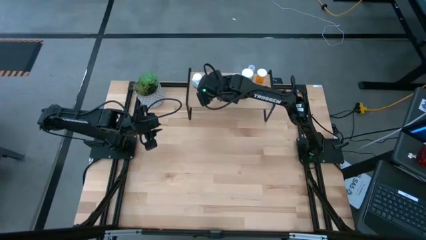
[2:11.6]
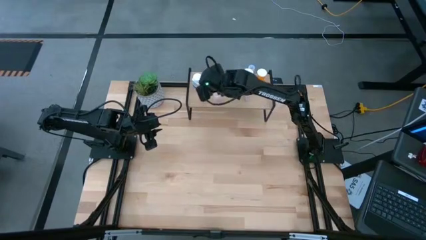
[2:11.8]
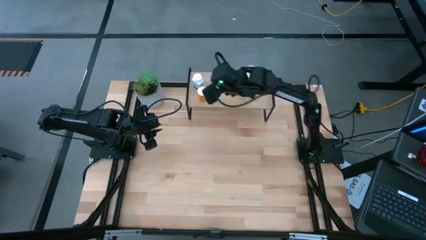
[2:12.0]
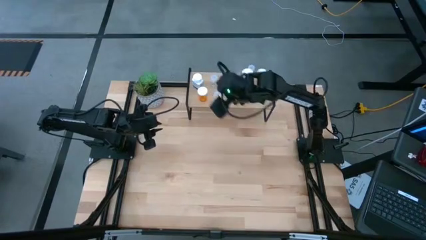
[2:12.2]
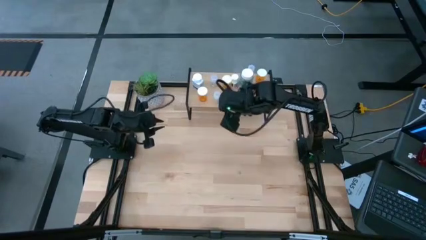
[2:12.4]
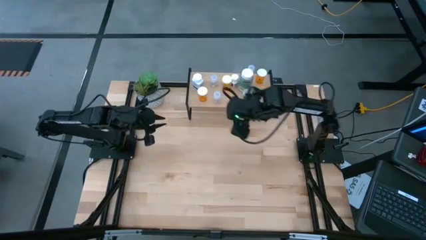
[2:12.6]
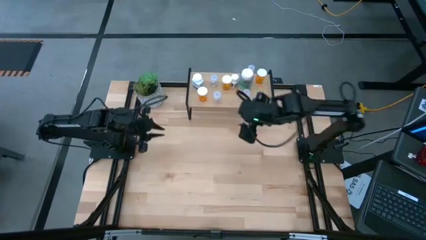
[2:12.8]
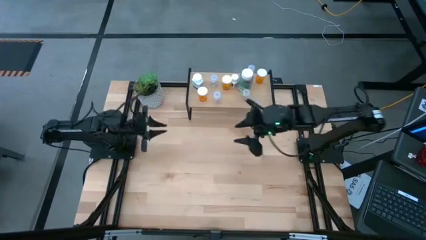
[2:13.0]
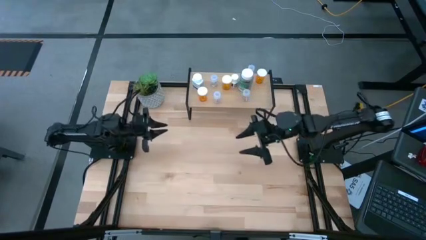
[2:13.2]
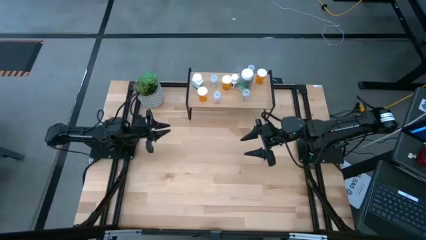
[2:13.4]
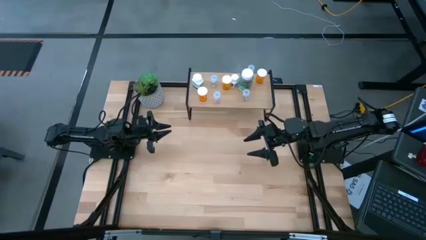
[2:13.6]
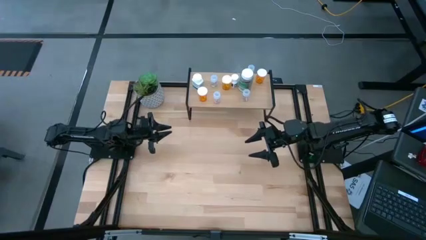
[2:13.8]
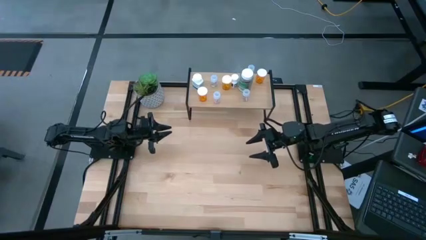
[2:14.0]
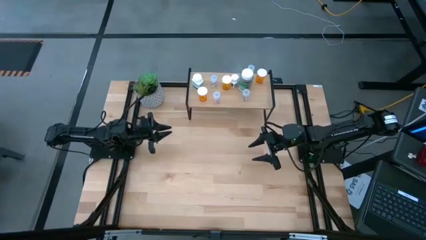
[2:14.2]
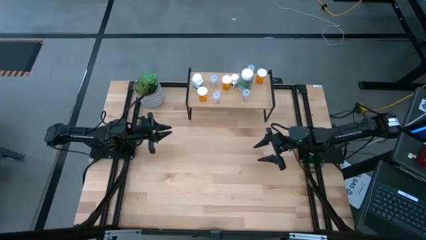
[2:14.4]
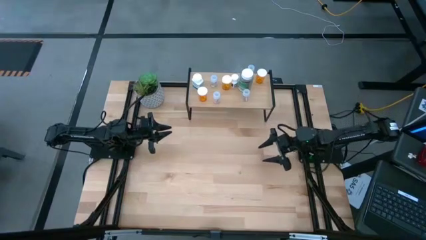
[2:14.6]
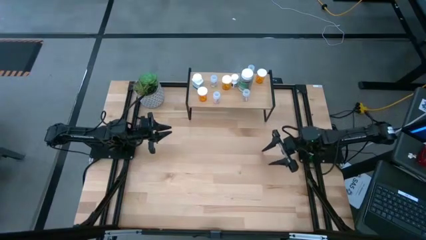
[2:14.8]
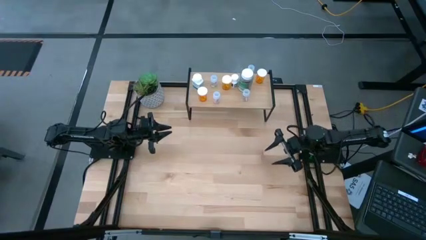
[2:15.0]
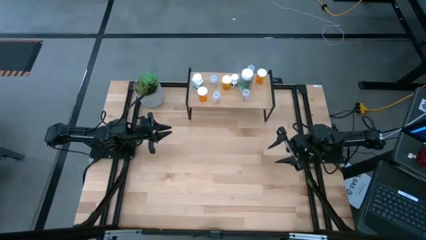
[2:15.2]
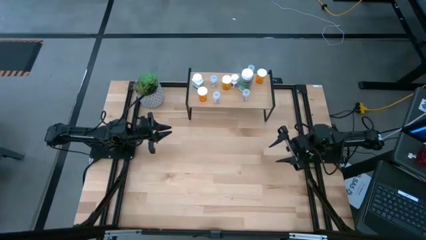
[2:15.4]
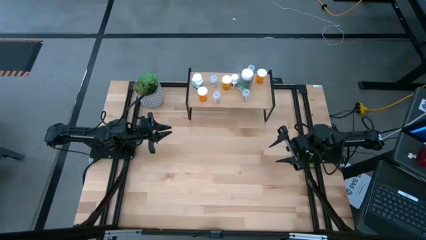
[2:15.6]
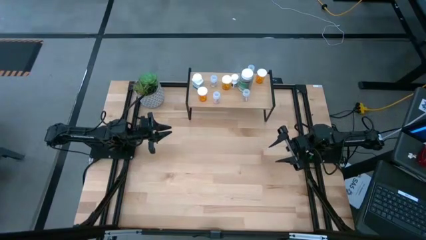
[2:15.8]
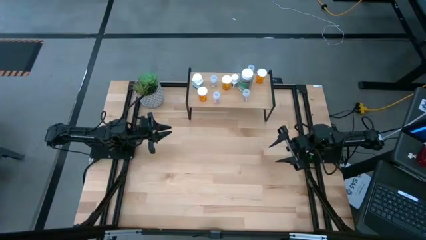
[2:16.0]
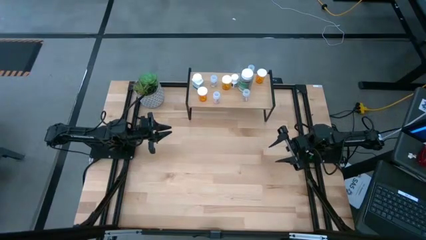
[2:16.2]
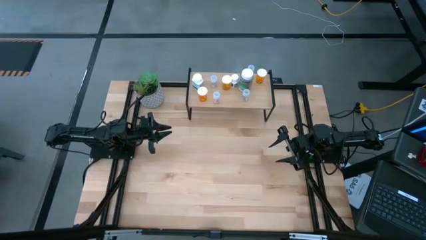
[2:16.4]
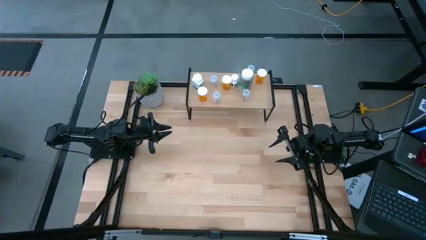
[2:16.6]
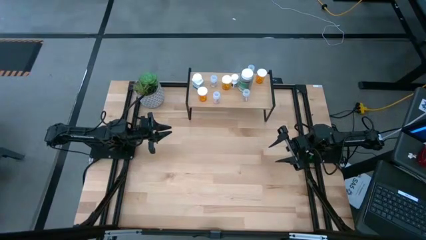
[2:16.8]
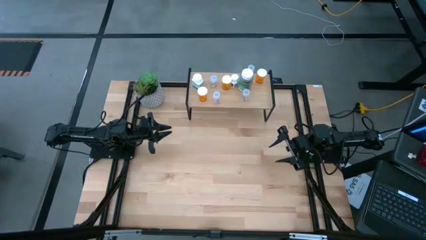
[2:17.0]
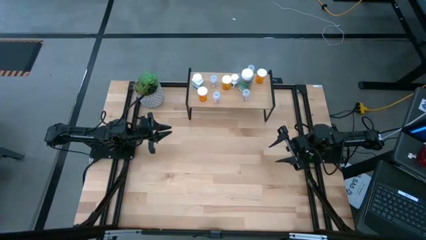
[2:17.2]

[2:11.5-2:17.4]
Task: Pick and place medicine bottles onto shelf by color
Return to Home Position

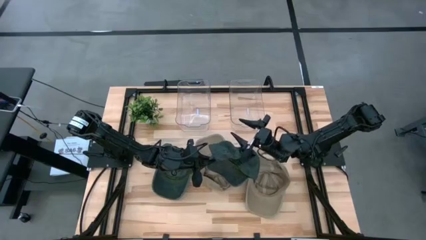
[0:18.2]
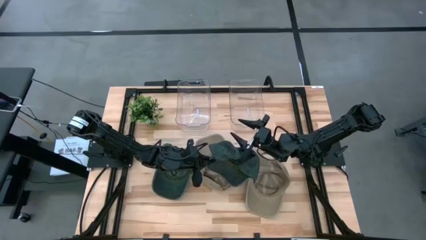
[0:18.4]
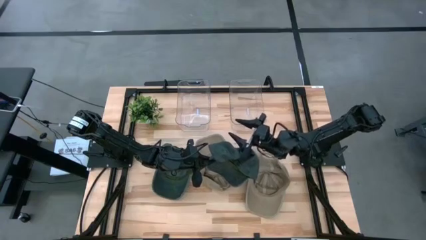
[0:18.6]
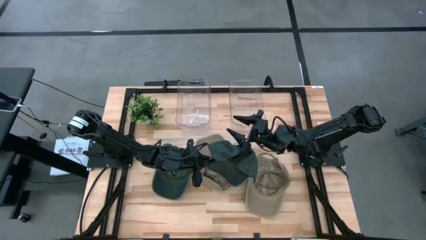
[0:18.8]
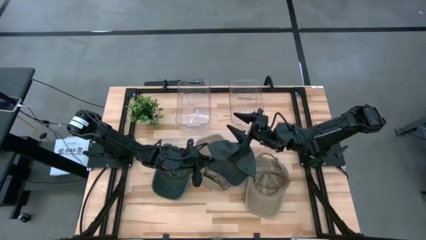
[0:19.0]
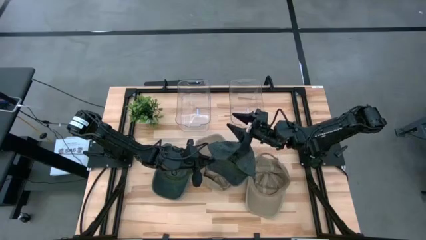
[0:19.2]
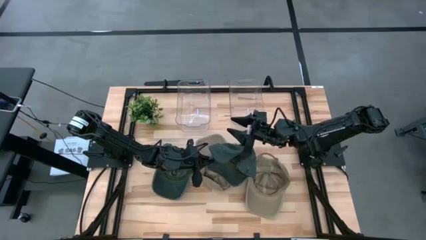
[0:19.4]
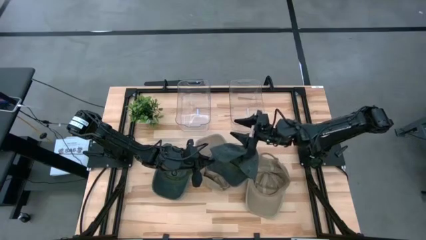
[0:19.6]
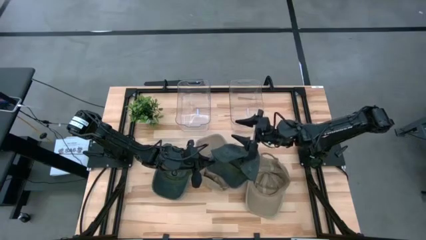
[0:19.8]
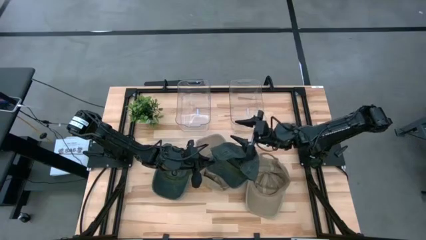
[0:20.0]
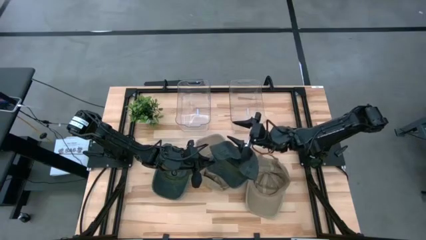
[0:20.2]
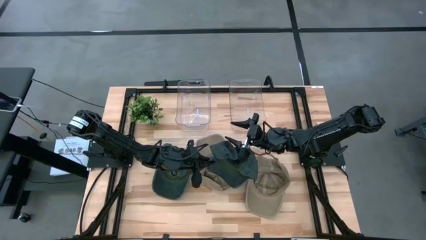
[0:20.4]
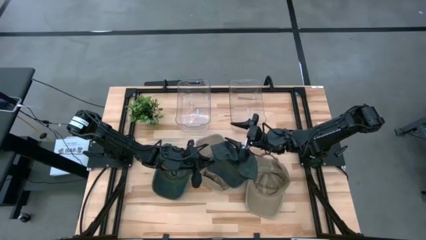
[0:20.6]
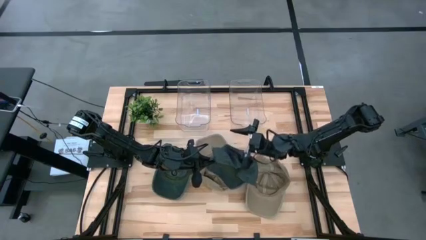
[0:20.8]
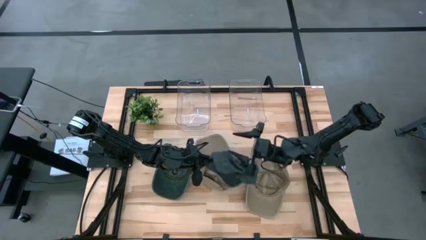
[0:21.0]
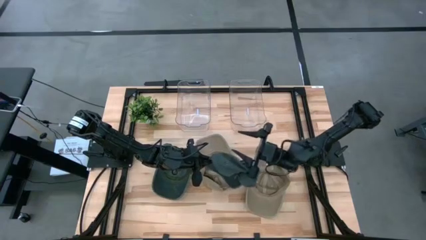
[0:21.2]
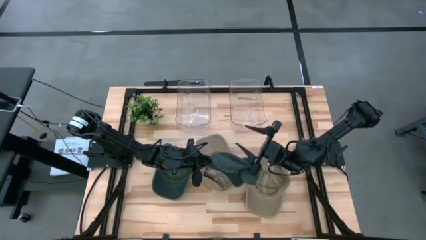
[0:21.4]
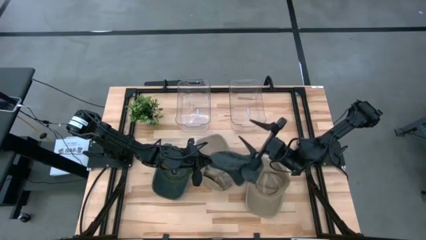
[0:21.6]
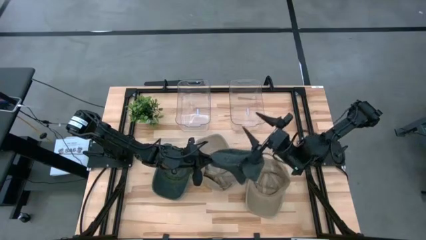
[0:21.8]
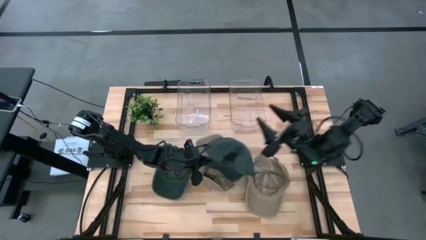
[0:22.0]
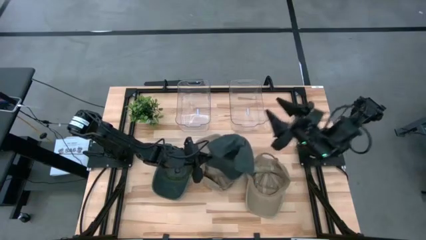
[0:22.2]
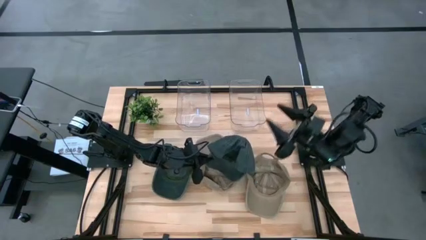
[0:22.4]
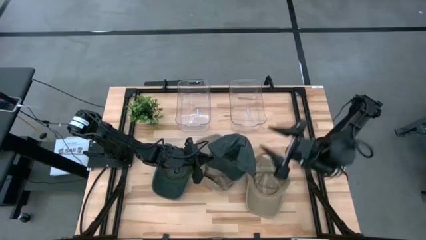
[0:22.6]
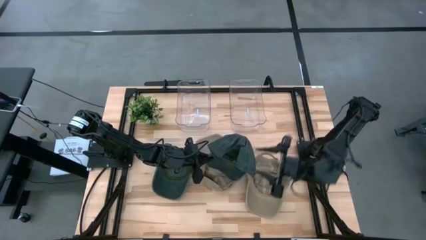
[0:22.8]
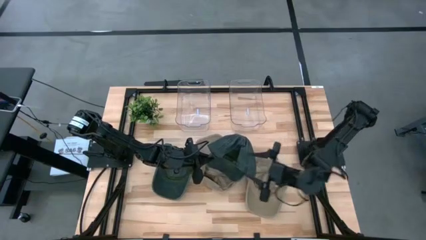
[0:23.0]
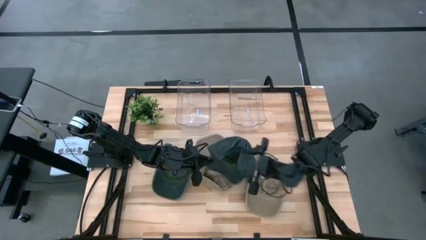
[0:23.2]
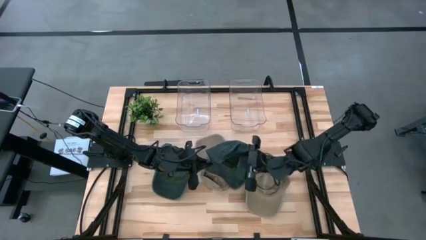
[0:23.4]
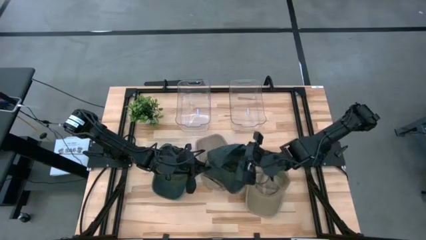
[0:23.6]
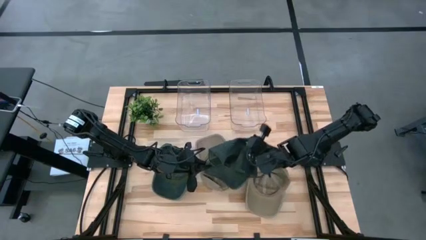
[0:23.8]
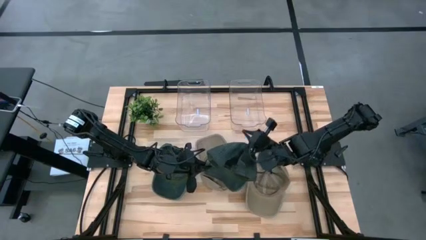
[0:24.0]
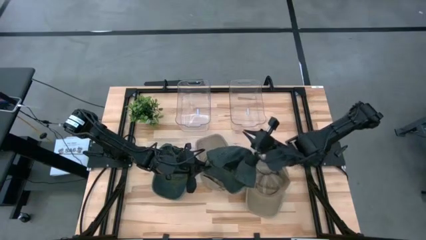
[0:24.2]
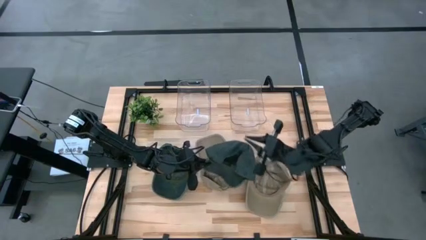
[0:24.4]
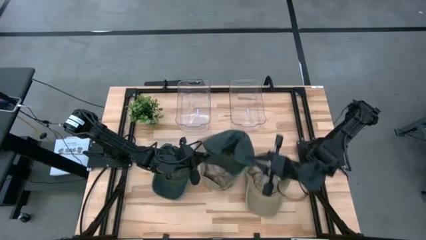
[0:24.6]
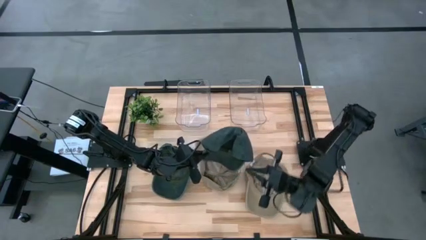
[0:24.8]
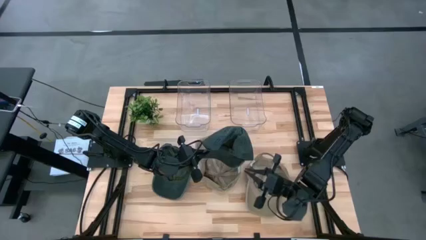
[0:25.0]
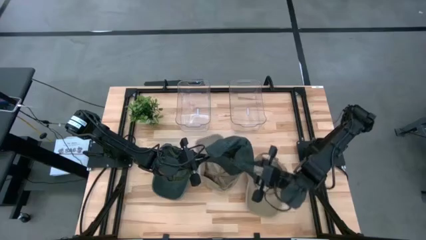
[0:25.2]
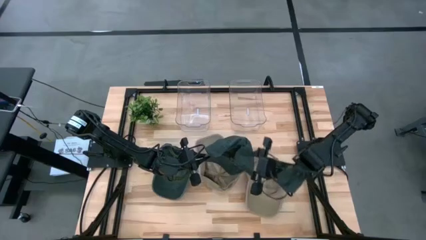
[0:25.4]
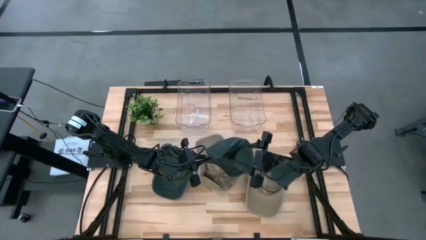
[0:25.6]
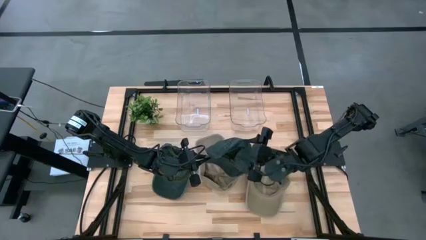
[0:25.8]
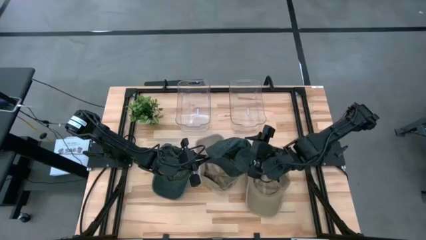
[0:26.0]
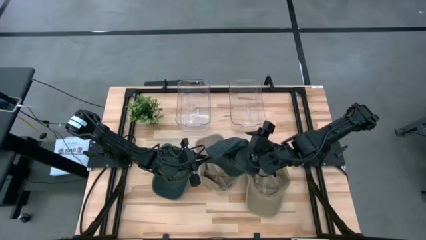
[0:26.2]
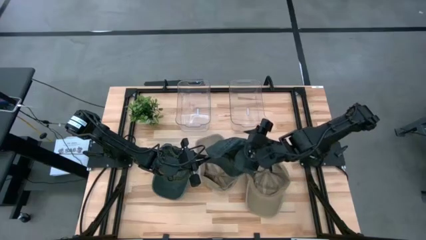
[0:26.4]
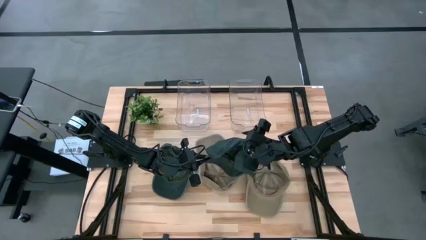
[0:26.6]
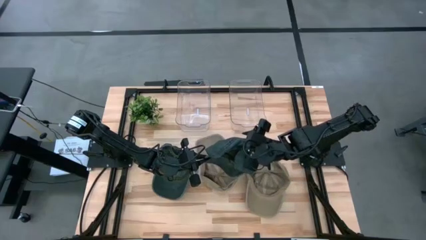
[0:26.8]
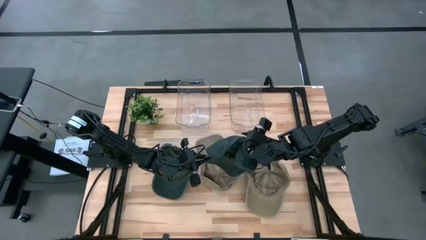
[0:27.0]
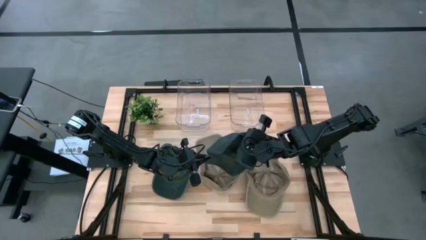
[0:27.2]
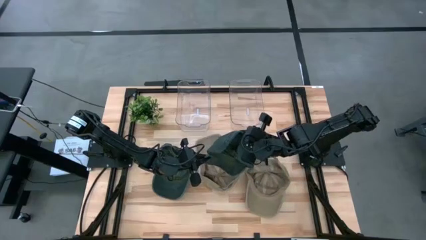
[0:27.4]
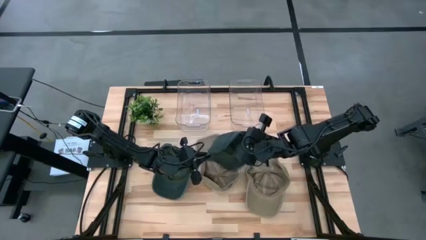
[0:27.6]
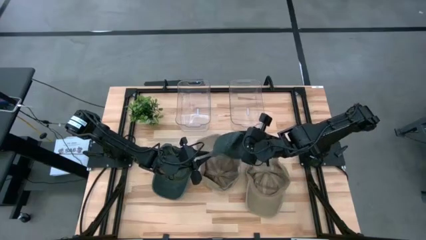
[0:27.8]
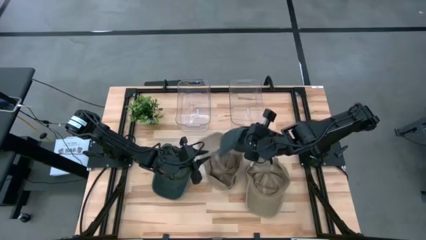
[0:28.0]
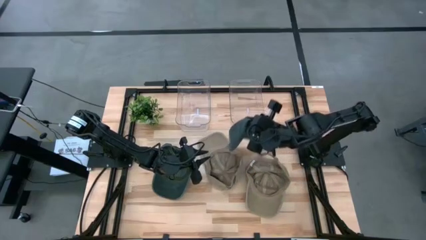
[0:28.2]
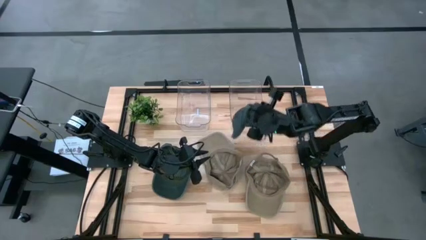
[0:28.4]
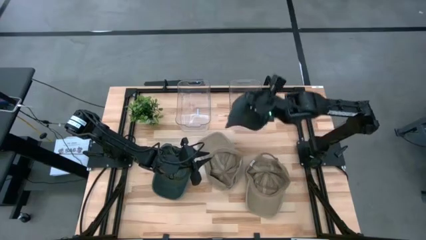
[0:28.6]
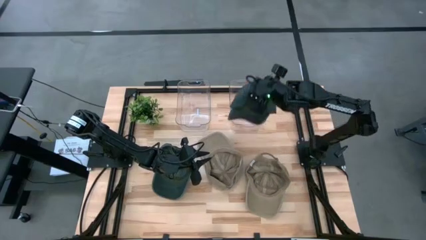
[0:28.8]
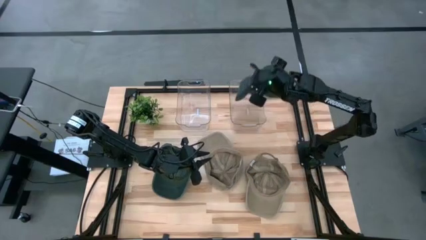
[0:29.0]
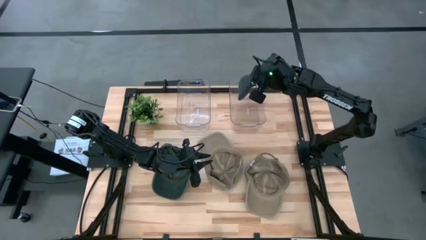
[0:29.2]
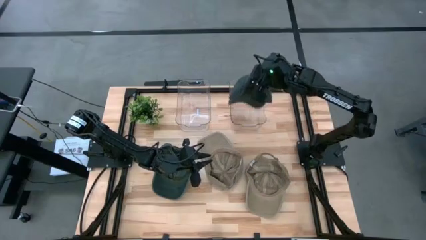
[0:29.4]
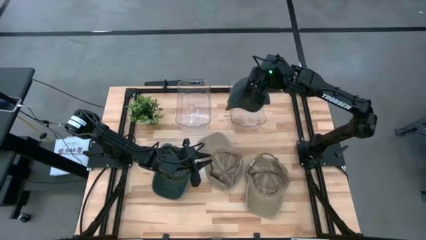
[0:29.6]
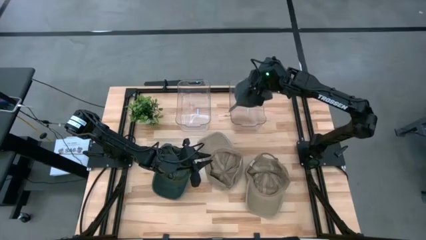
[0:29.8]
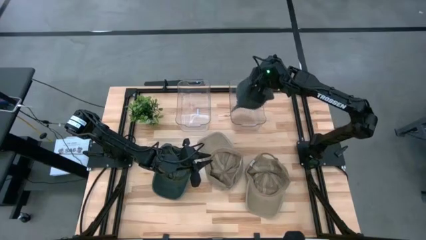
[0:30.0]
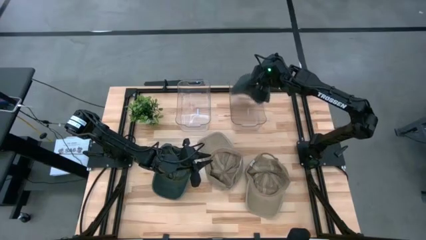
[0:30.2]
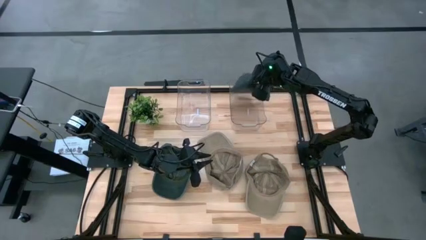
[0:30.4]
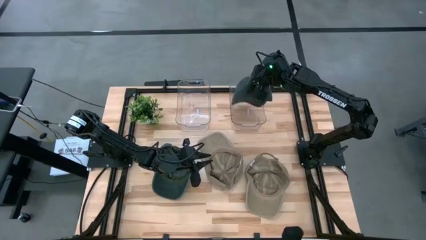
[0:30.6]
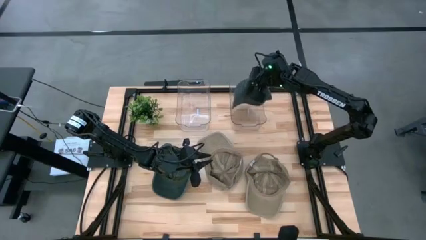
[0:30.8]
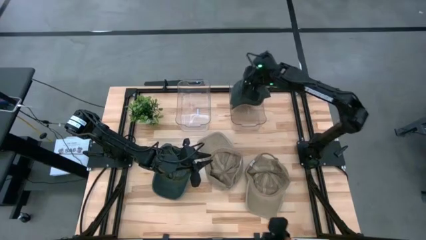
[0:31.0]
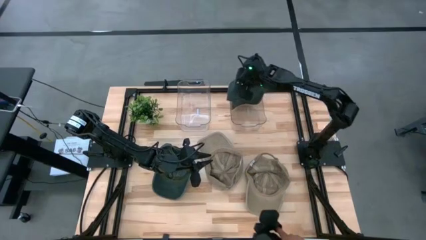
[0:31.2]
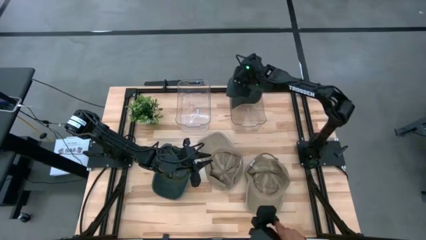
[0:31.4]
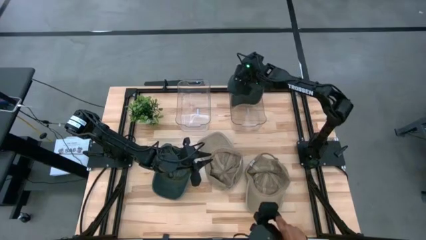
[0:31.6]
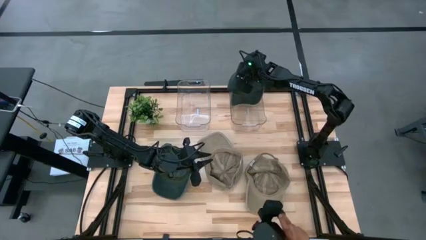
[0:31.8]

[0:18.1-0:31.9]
Task: Pick & Place hat
Put the right black cap into the right transparent bin
